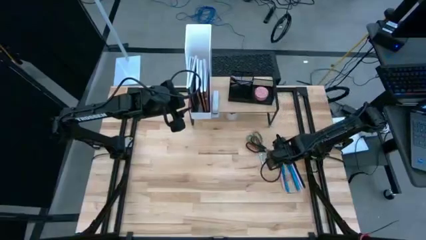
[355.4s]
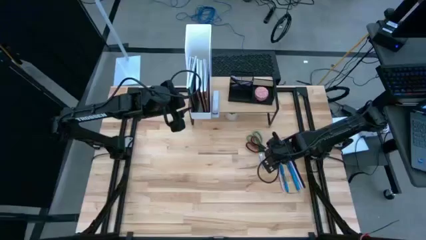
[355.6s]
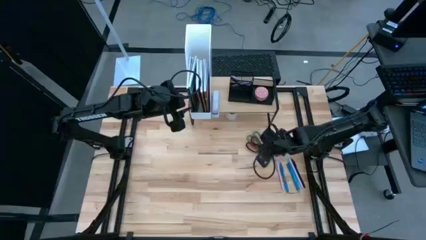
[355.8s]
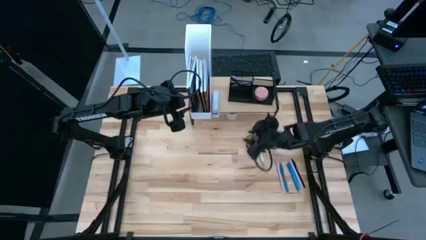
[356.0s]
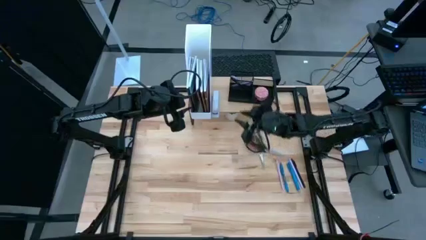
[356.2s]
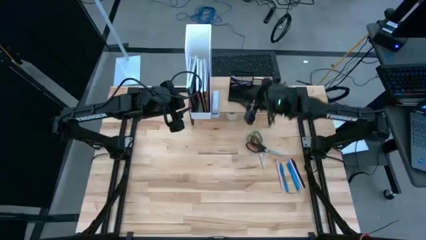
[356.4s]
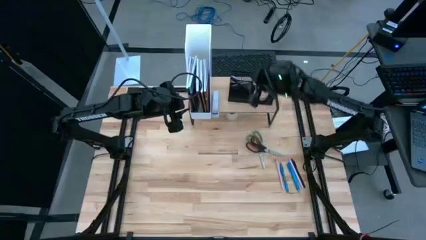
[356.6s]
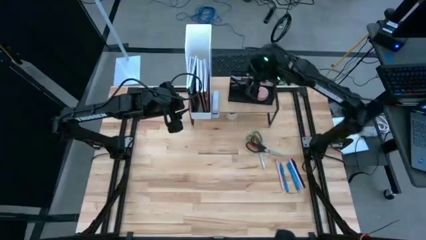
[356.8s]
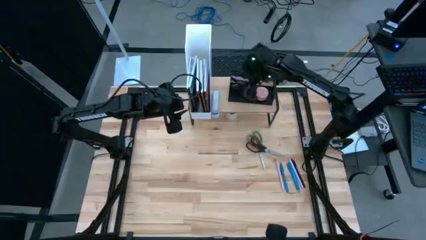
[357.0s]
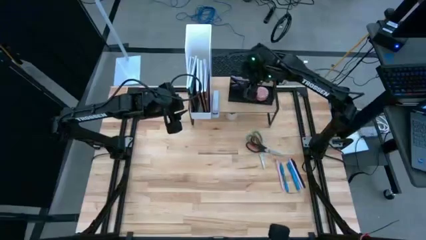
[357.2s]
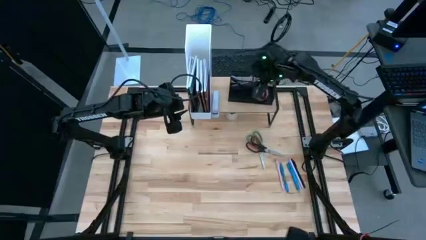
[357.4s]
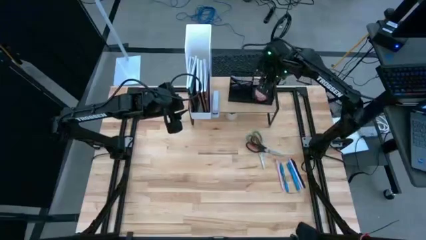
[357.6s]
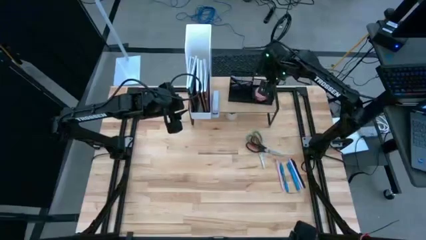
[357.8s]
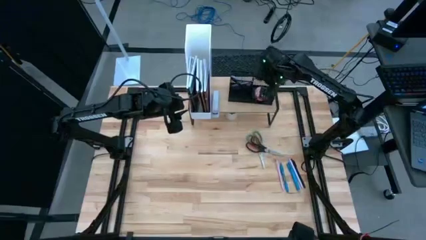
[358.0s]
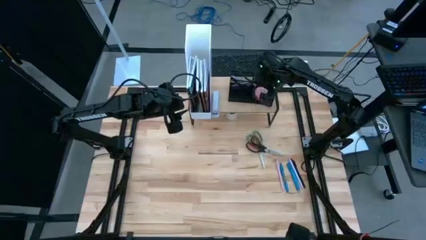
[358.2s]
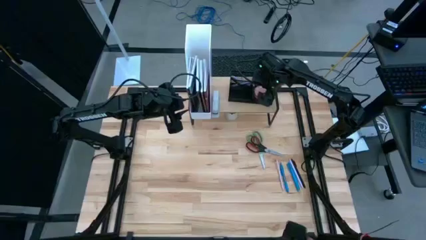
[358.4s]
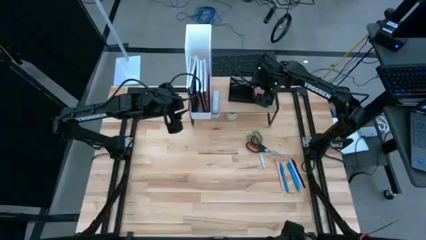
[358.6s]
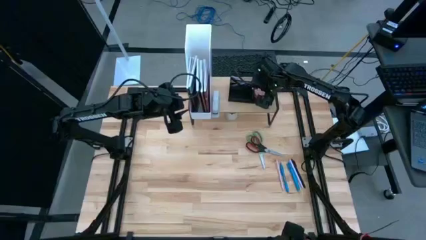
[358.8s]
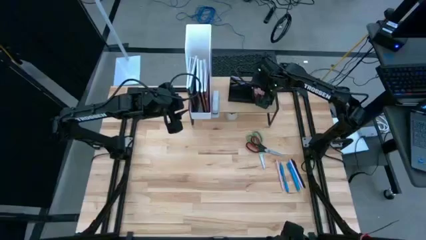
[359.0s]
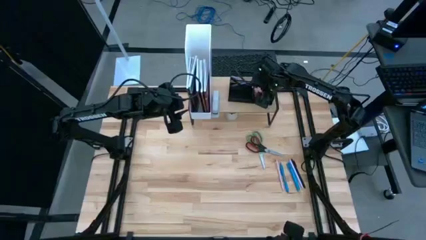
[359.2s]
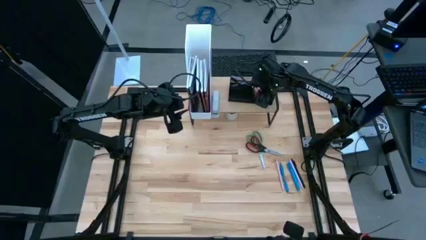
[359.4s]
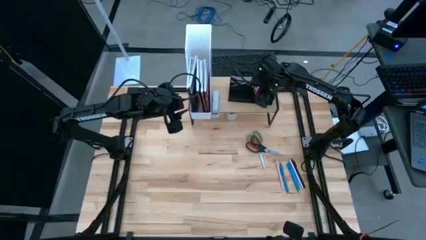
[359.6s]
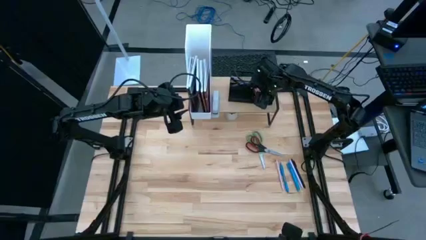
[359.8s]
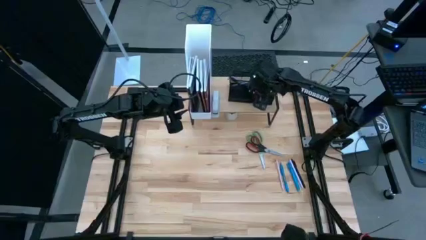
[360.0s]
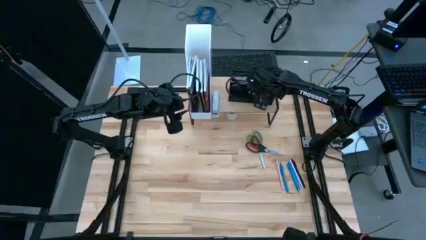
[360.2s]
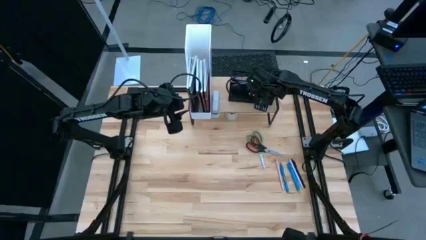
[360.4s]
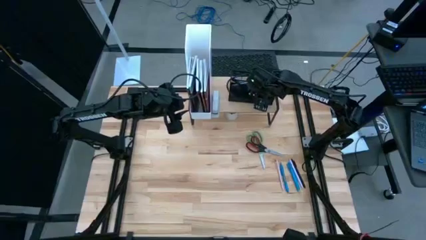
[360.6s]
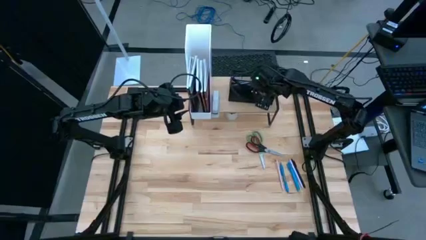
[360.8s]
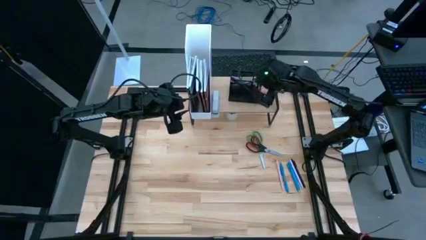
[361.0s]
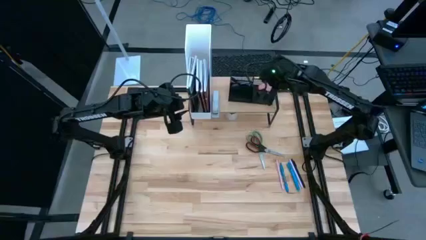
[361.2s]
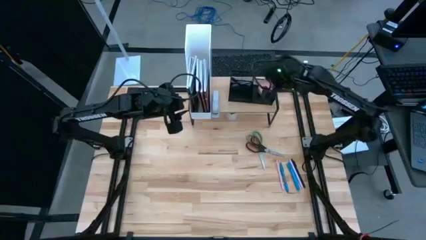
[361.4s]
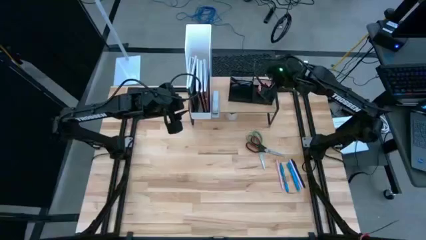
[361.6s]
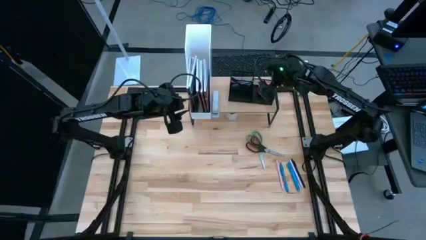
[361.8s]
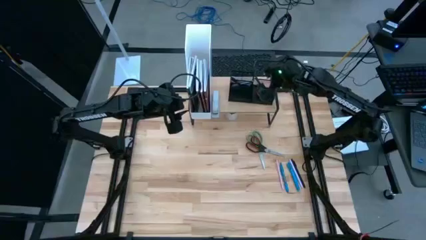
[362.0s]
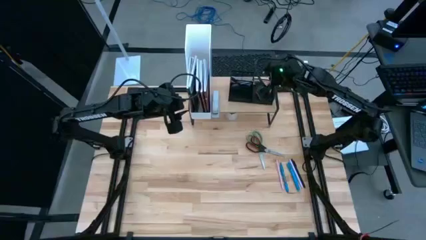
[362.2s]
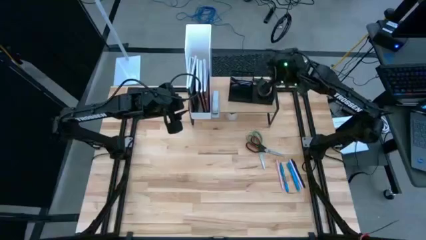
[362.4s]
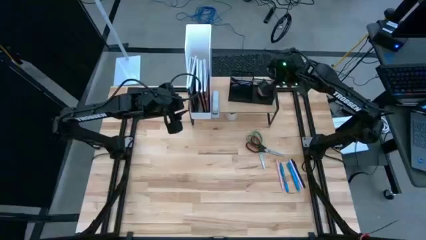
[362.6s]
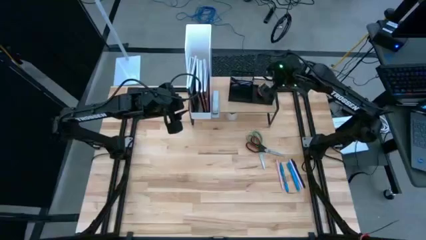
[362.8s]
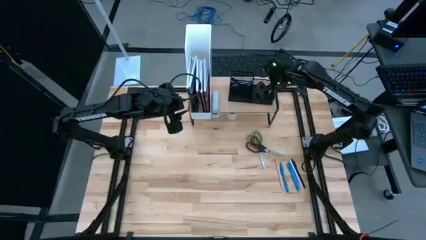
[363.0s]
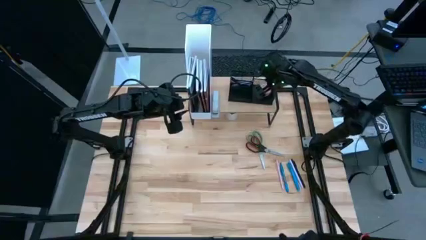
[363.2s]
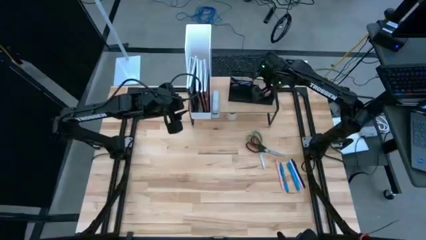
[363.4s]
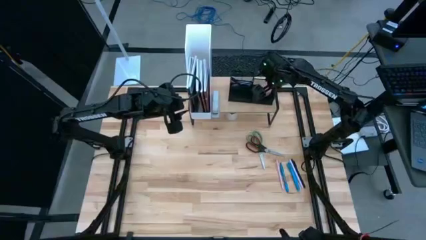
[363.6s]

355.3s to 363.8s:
Task: Stock shelves
Remove the red scented candle from the desk organizer on the shelf

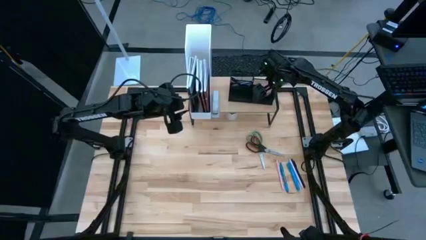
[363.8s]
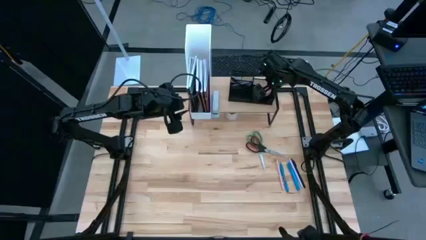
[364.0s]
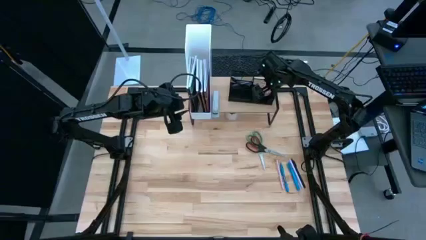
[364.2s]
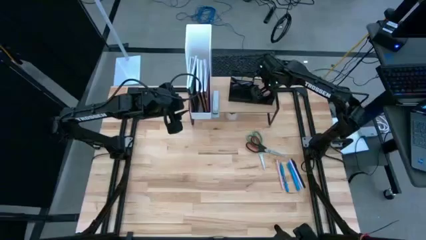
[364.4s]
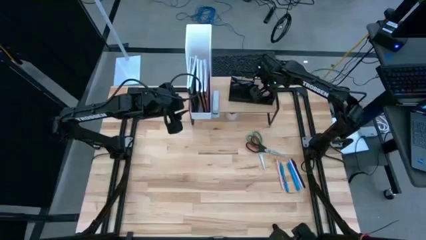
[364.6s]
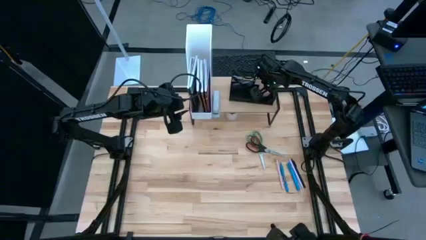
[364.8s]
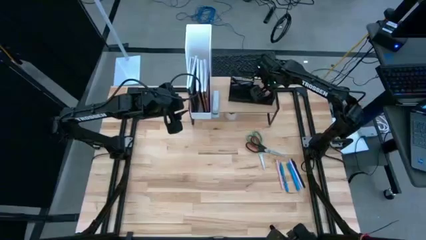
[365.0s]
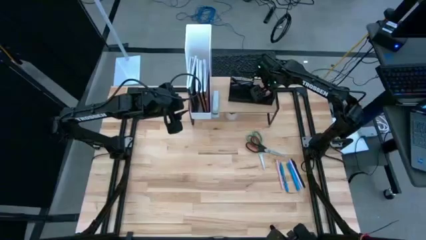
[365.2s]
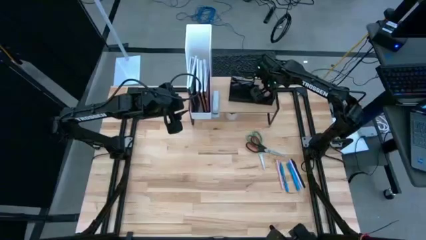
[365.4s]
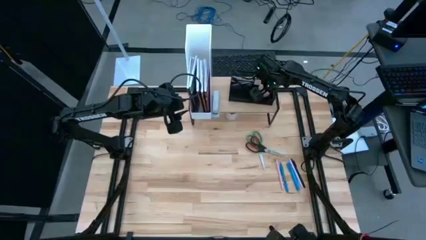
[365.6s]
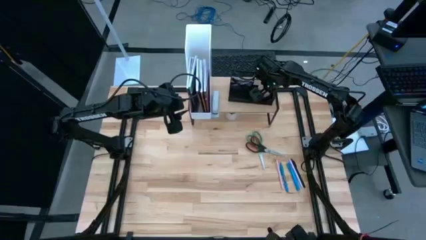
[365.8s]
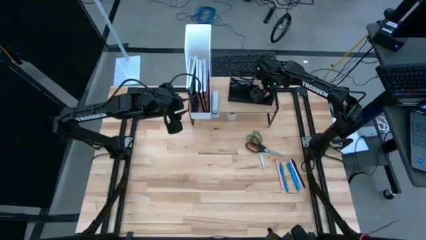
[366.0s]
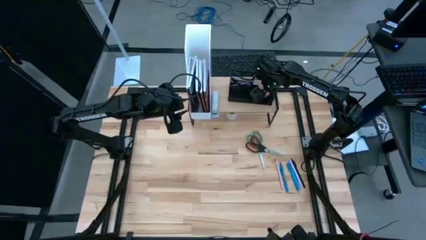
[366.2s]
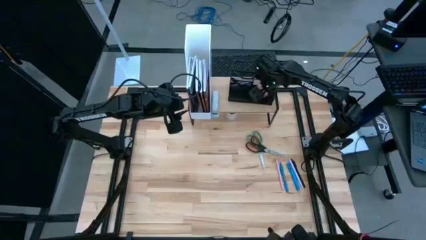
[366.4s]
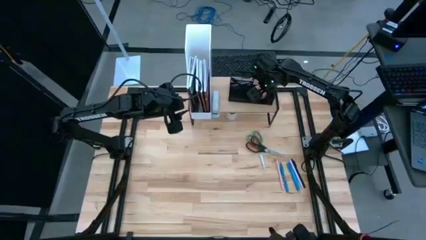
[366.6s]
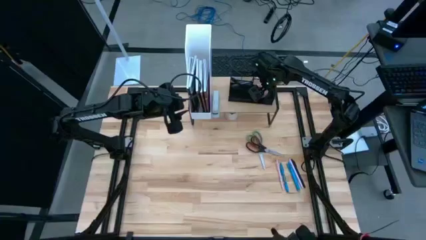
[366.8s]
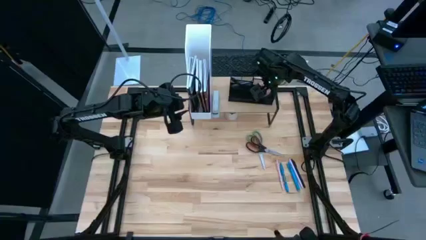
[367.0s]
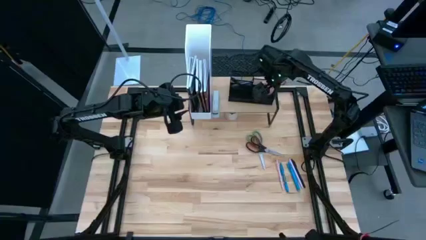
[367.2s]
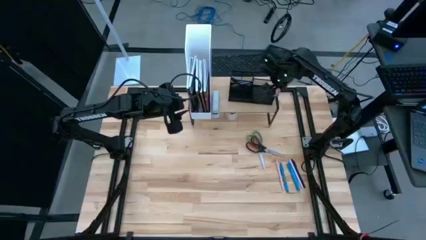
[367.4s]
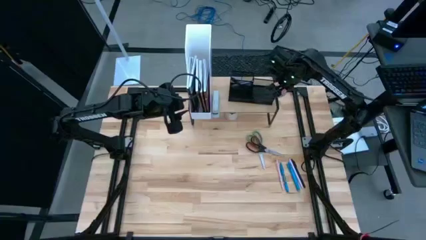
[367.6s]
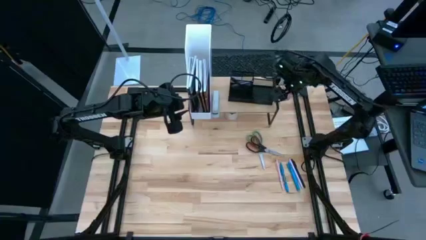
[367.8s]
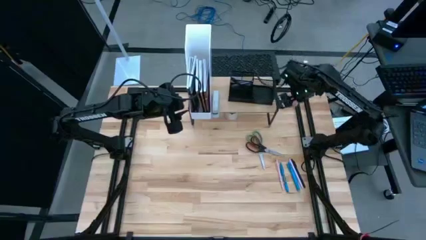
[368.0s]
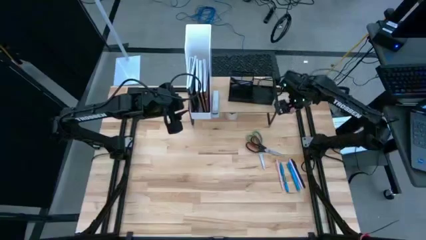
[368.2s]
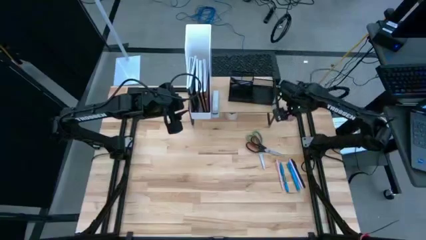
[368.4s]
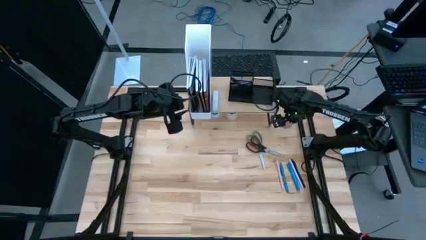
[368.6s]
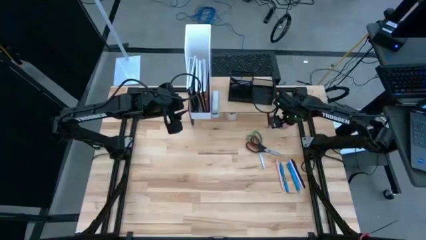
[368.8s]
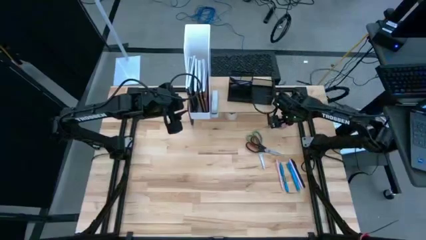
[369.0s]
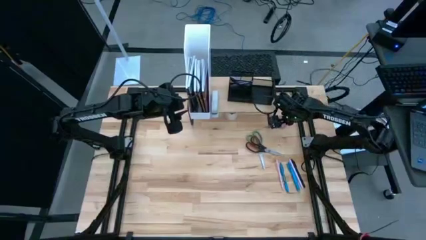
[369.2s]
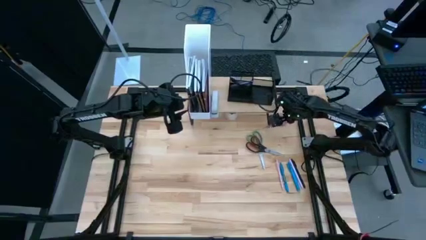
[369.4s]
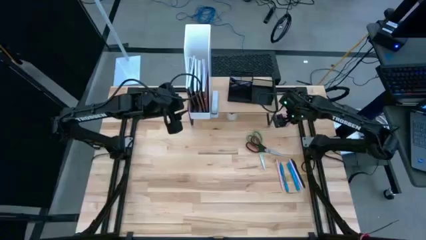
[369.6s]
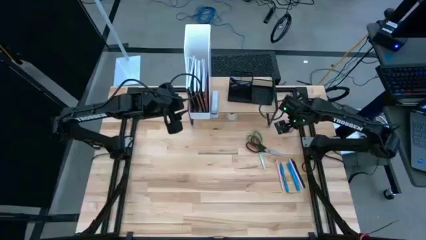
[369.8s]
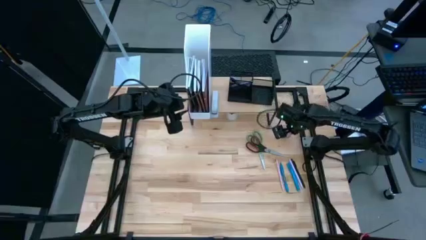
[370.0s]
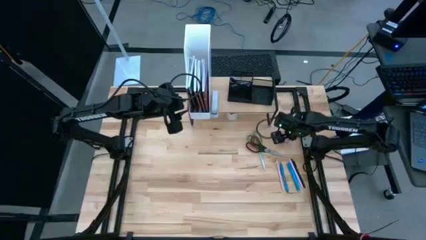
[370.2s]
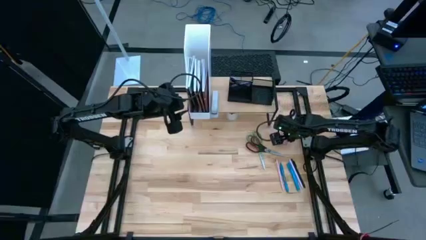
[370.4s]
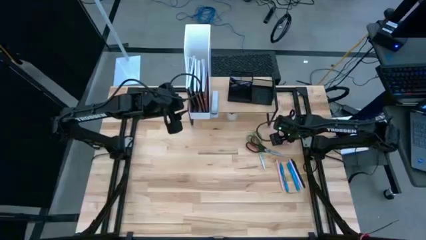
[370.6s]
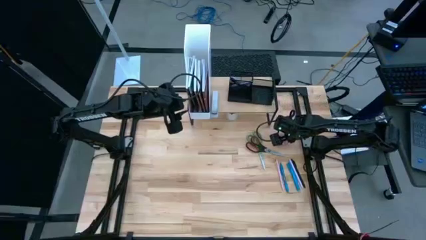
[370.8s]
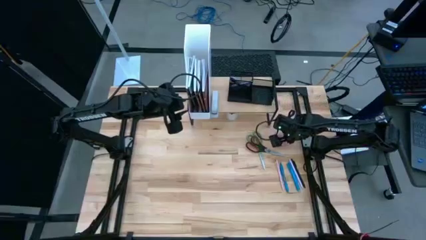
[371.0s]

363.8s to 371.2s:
Remove the red scented candle from the desk organizer on the shelf
